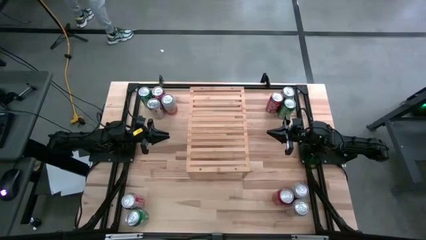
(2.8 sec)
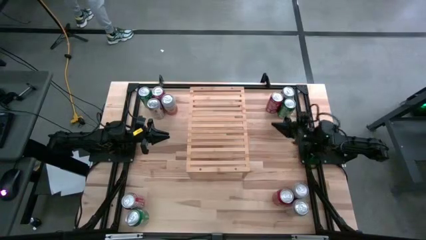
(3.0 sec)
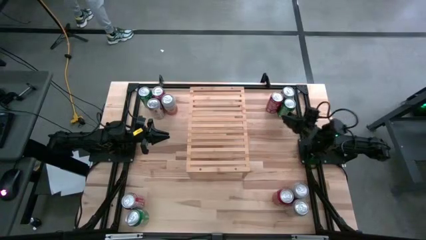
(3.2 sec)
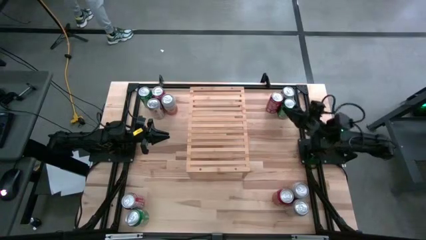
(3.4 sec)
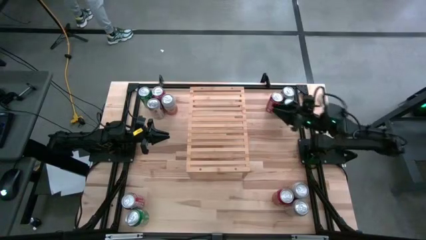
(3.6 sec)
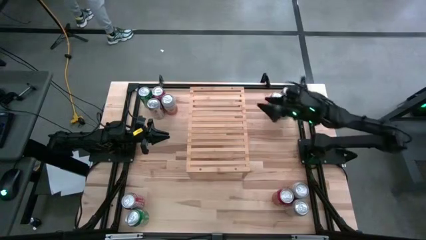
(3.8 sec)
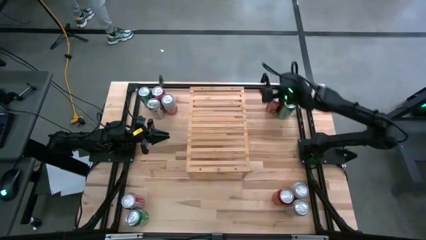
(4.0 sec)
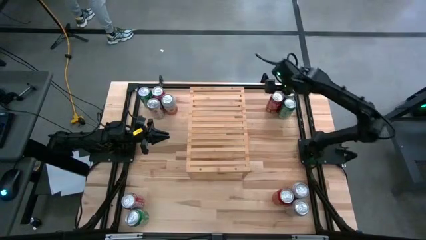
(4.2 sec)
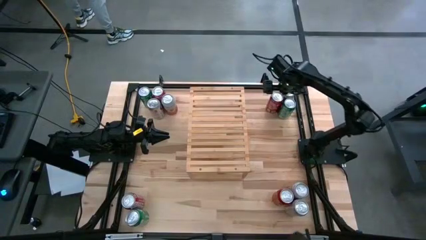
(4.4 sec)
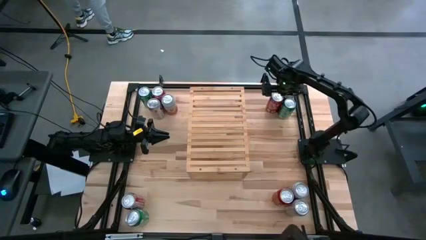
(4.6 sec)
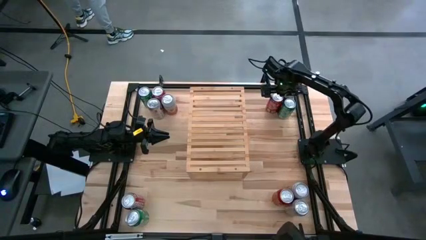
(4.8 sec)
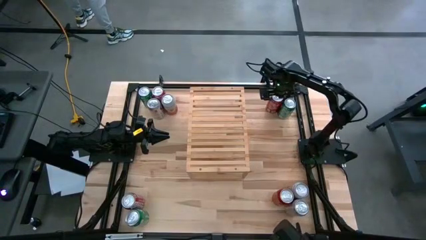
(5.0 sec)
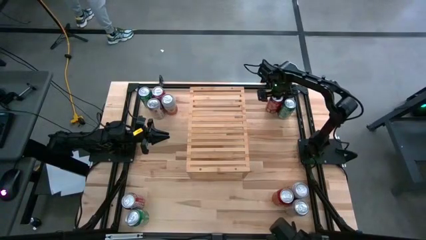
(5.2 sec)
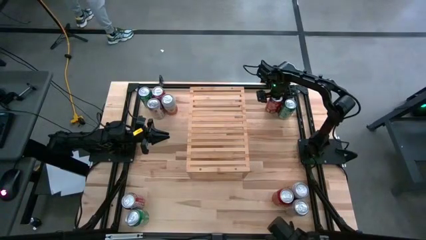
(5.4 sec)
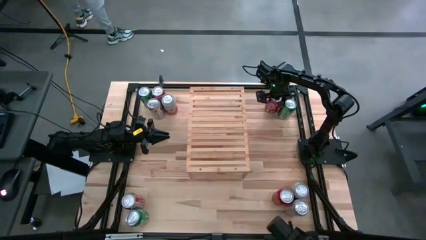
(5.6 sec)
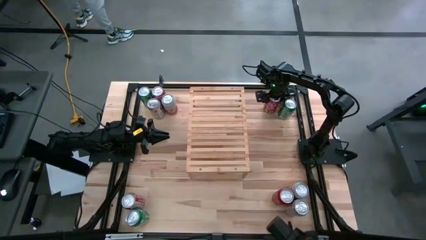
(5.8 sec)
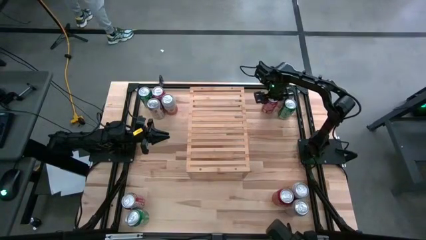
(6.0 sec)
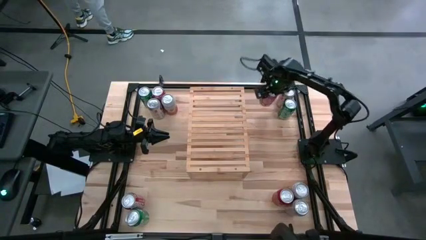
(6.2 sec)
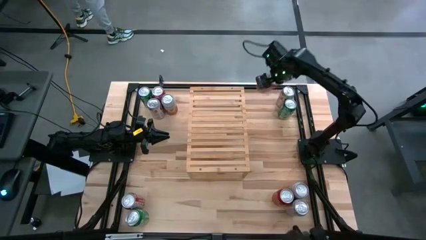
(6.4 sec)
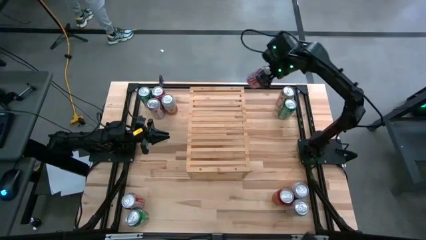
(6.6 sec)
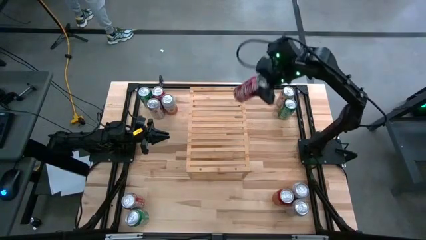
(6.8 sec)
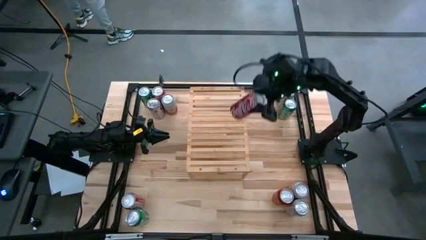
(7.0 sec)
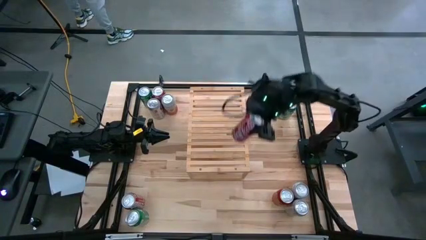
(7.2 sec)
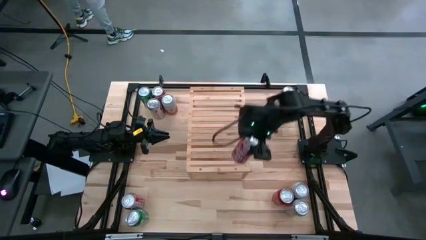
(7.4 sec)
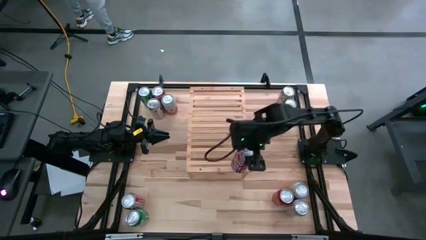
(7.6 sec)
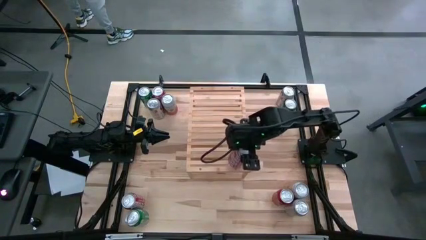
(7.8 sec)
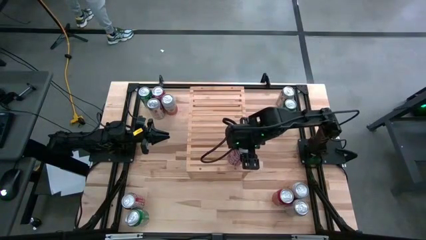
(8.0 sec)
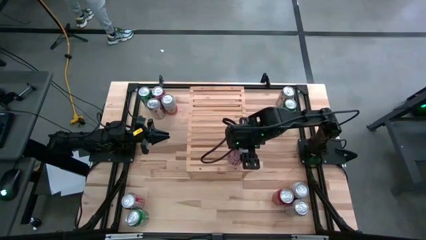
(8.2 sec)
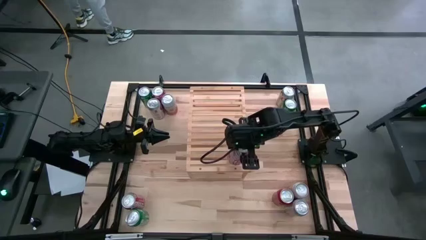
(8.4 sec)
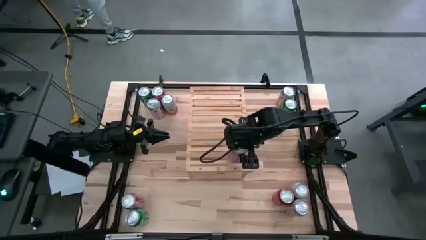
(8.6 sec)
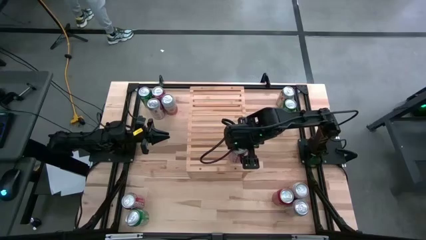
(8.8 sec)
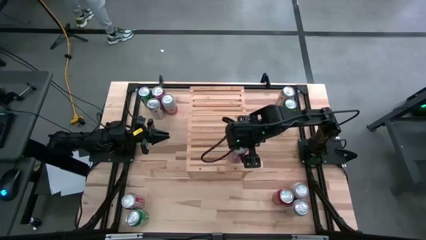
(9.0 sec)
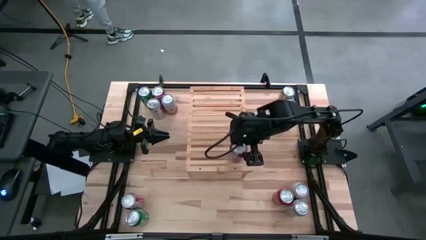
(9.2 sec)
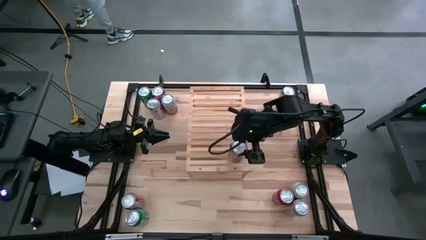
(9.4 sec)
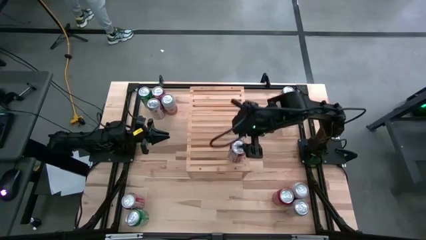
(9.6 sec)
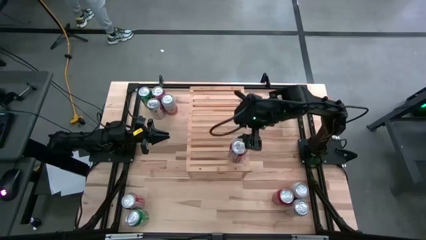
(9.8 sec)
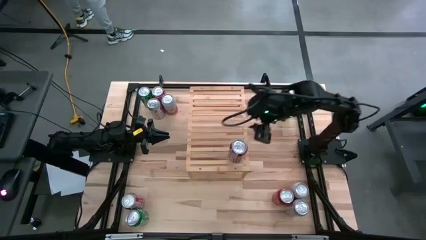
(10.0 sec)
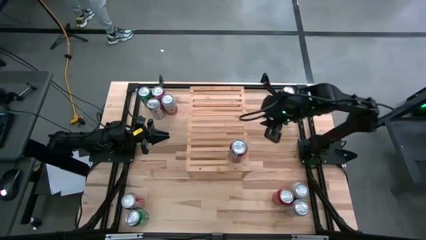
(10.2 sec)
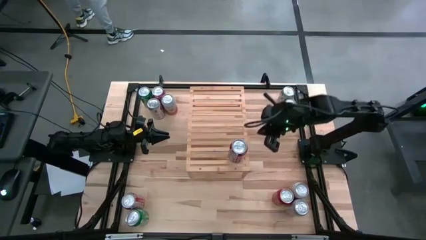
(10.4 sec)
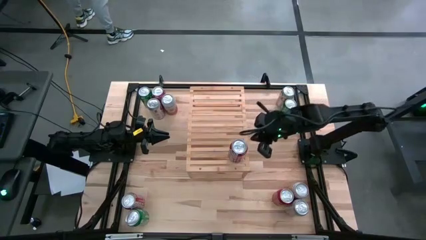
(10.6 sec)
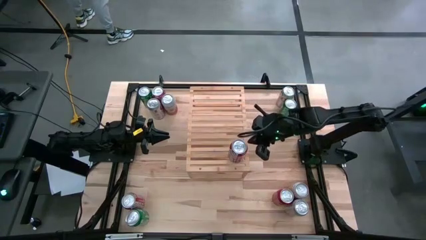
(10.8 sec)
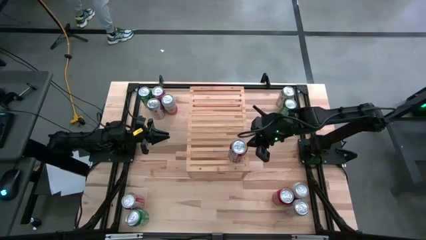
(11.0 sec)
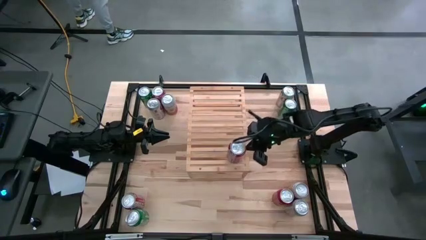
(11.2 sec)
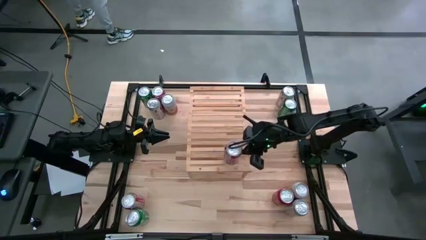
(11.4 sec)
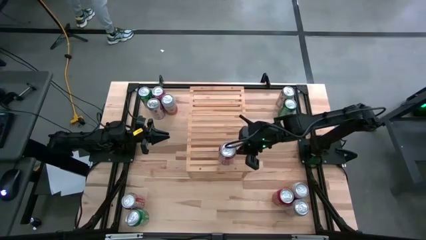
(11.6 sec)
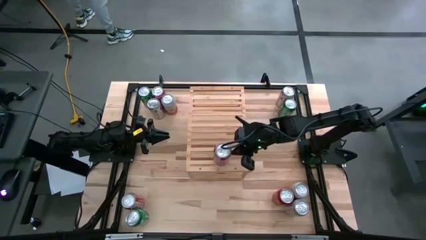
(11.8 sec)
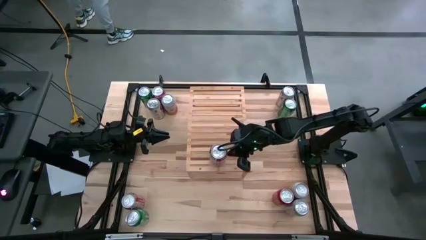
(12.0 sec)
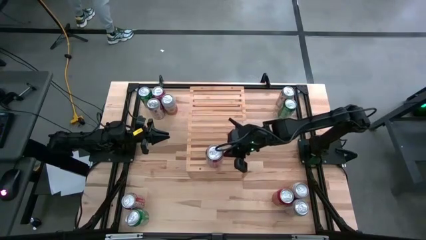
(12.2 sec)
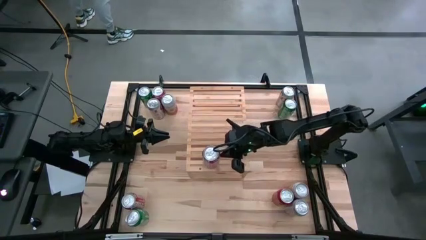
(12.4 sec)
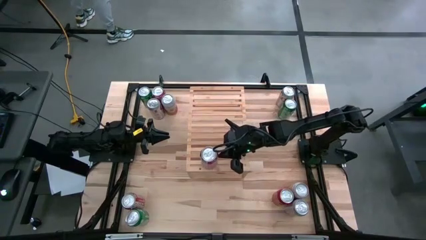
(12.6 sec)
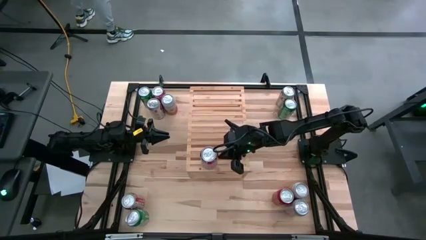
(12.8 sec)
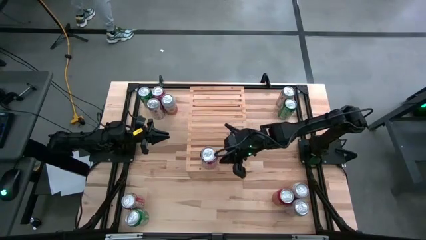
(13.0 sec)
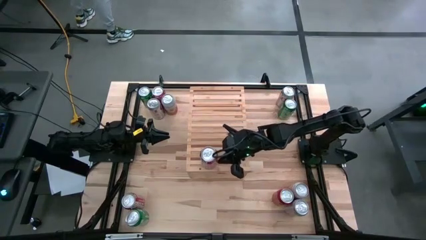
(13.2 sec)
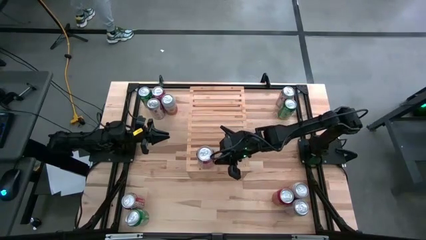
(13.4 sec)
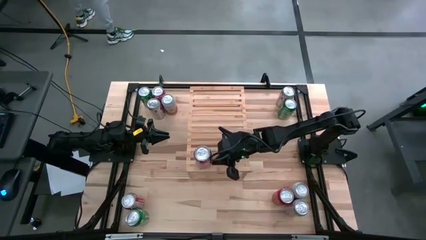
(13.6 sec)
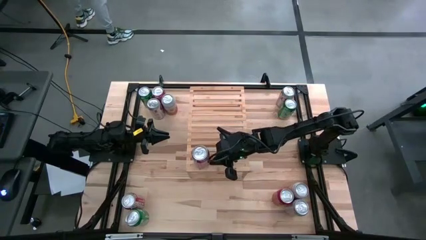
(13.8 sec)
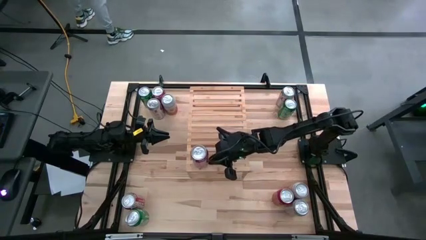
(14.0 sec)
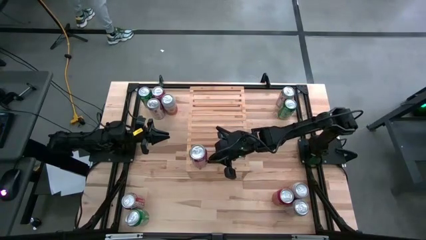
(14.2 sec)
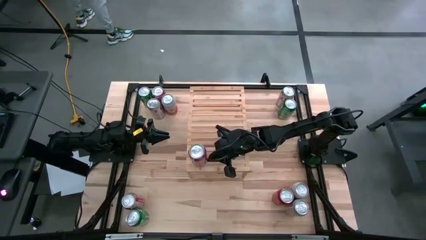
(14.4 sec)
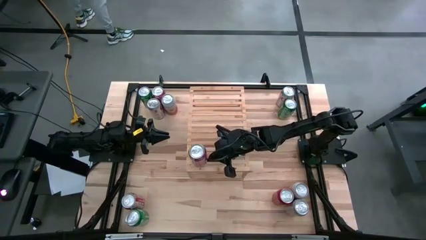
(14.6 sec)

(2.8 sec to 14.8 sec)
Task: Place canned beverage on shelf
Put the top right red soda can on the shelf
